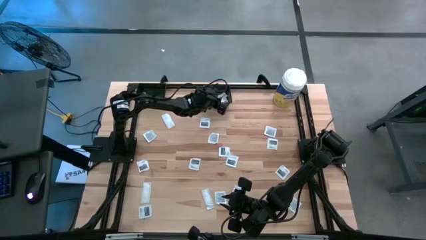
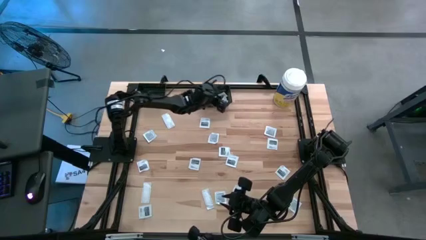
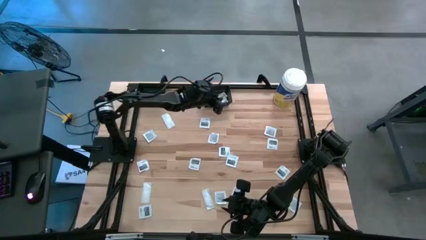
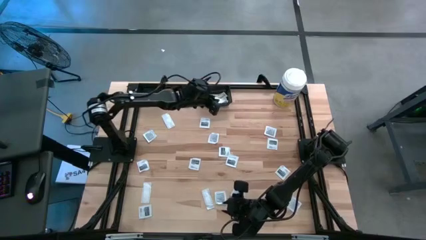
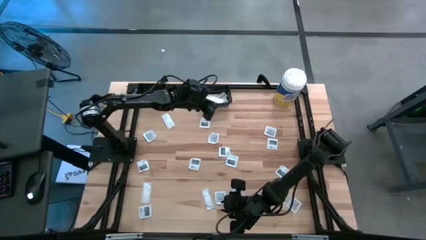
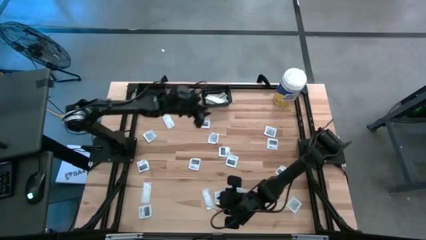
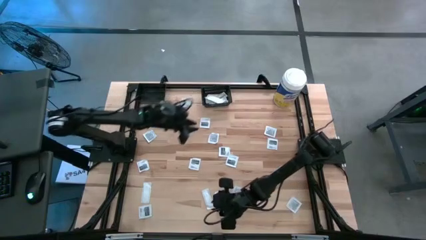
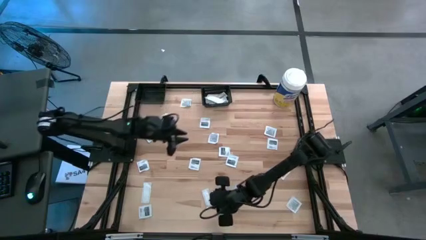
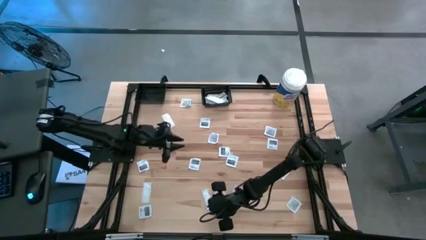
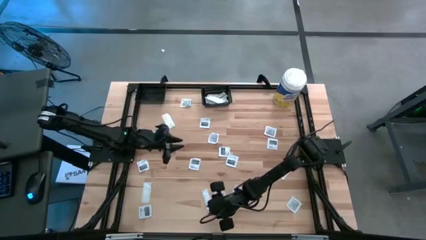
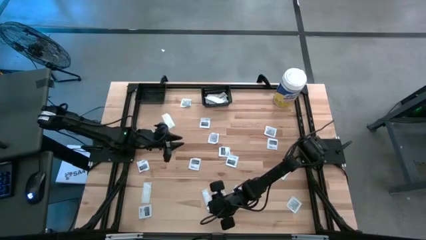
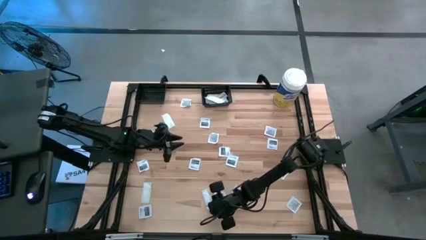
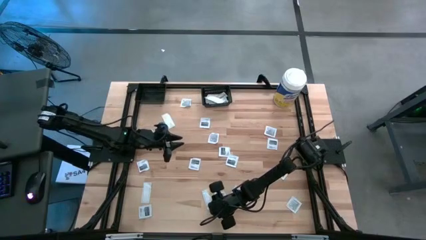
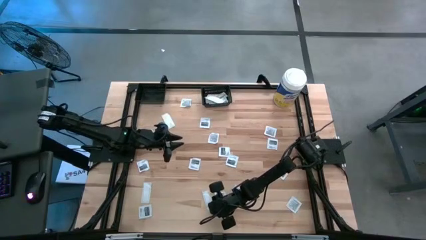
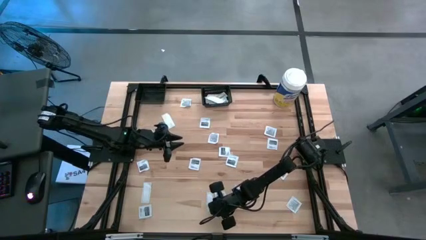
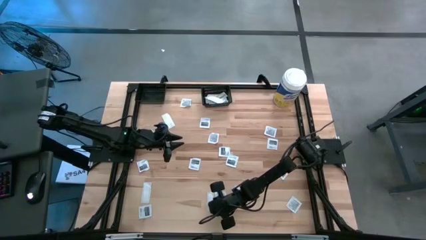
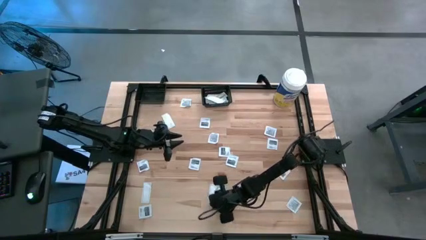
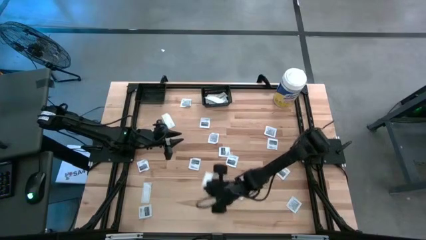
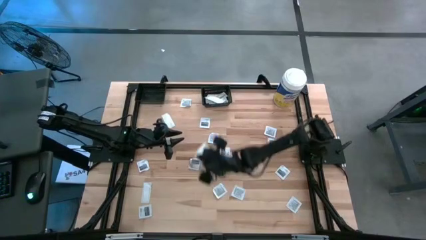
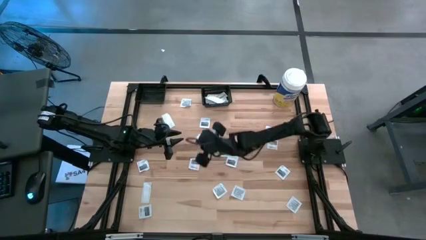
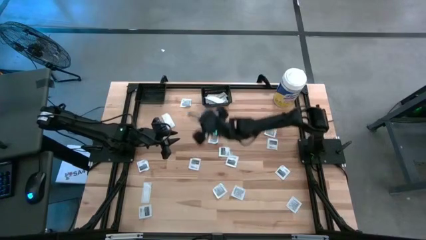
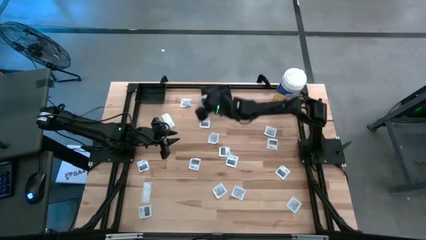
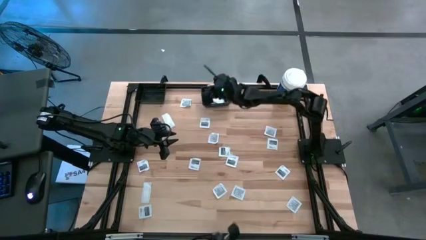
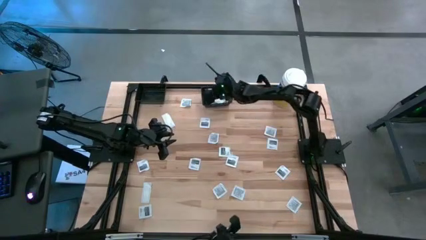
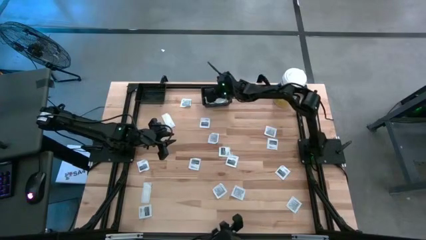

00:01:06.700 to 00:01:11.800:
Task: Pick & Place First Aid Supplies
Put the green bandage pack into the right black bin

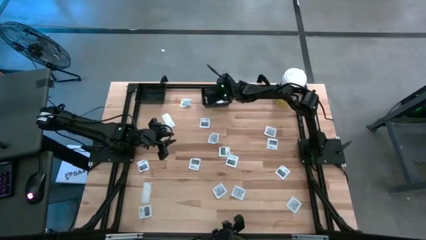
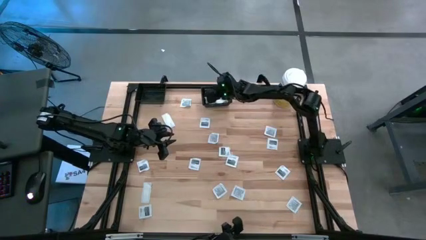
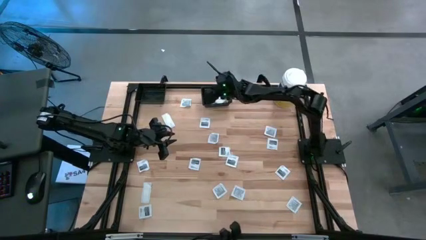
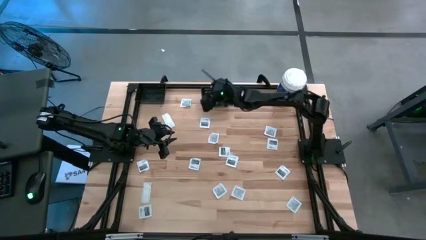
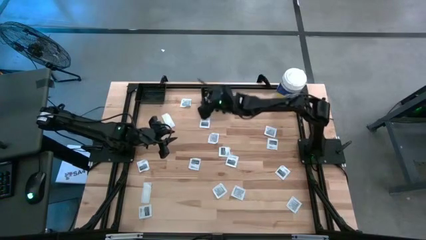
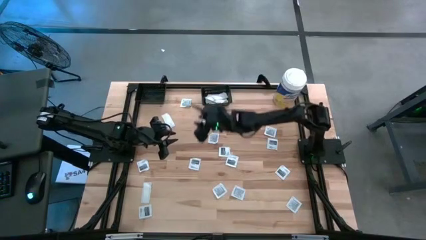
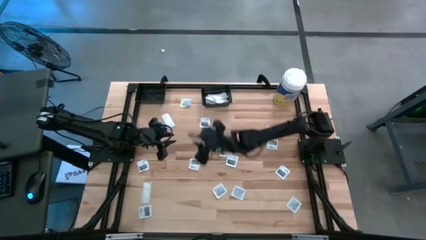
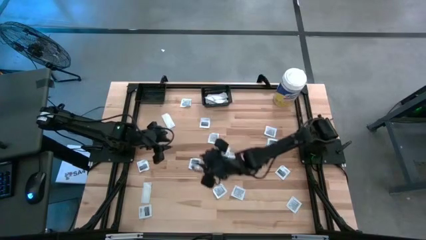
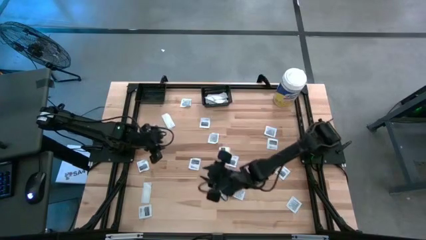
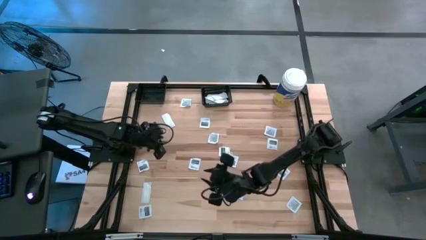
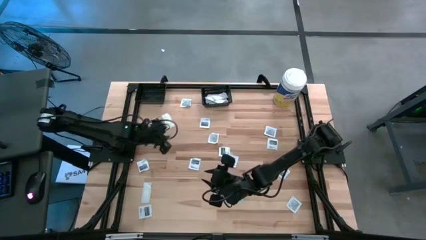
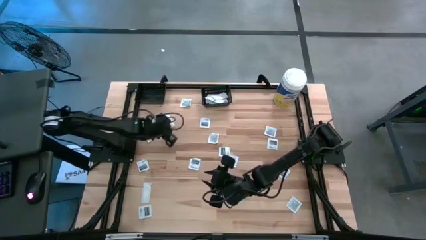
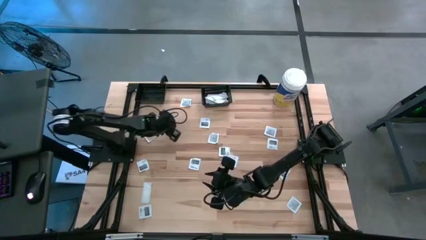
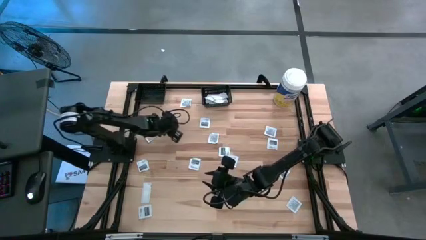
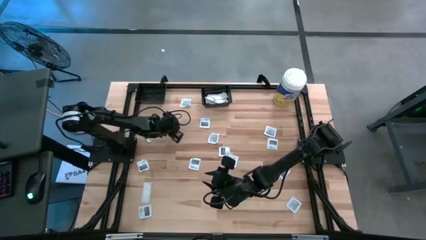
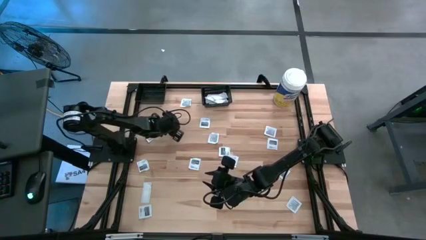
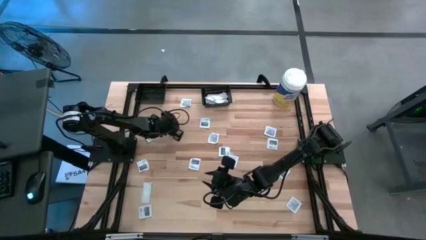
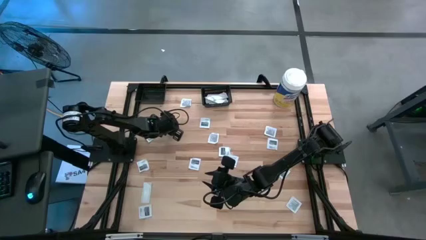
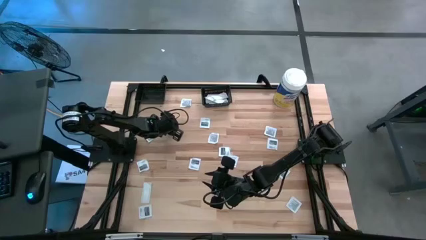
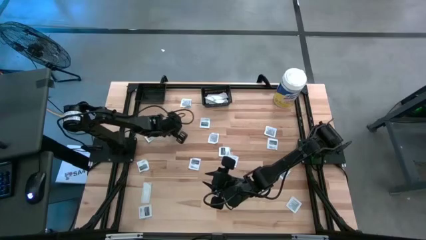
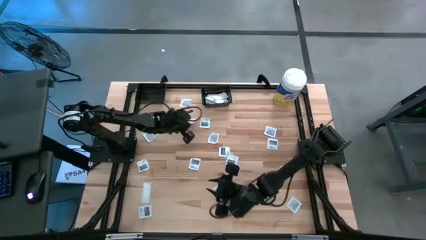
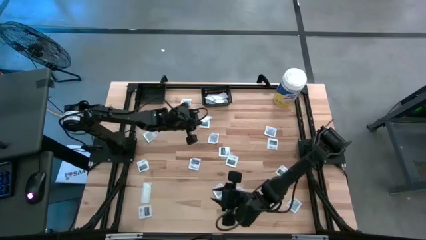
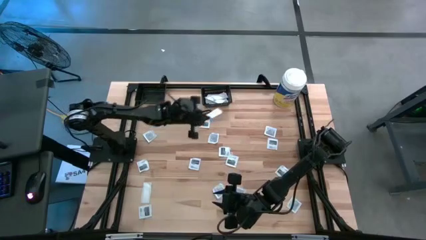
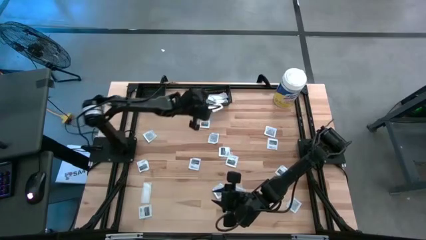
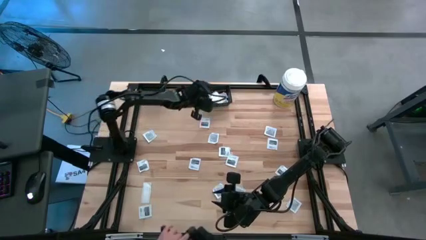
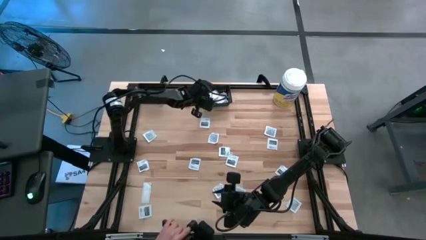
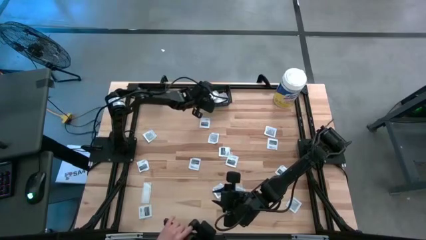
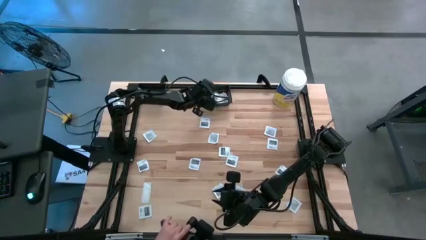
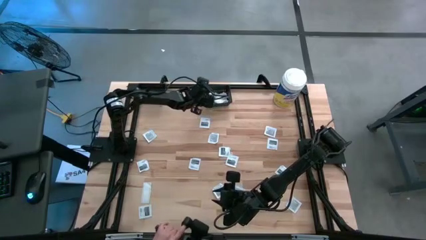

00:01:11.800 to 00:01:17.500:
Put the green bandage pack into the right black bin

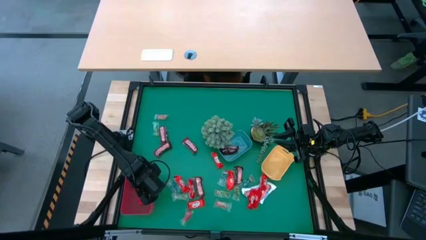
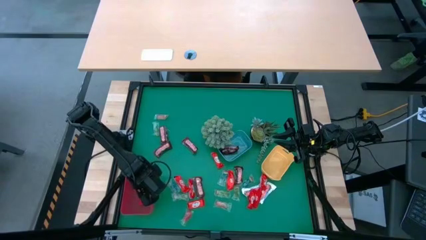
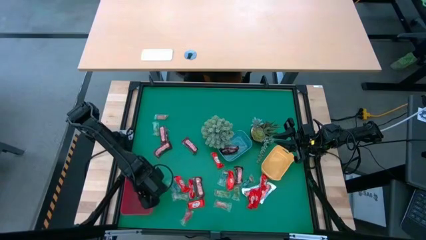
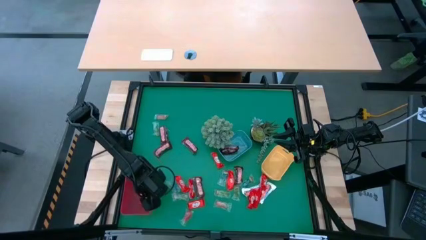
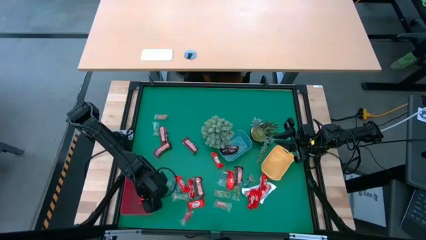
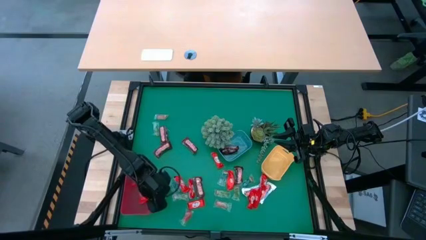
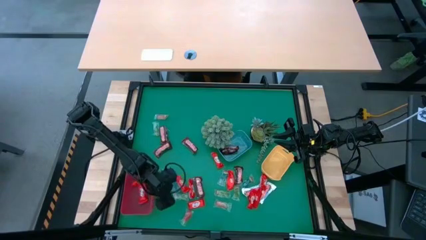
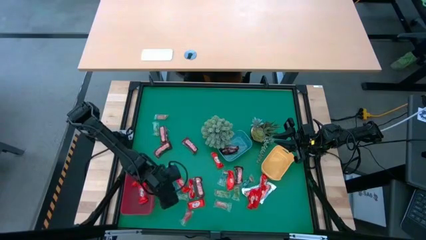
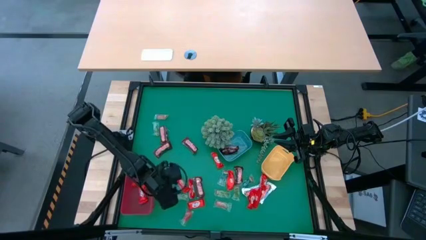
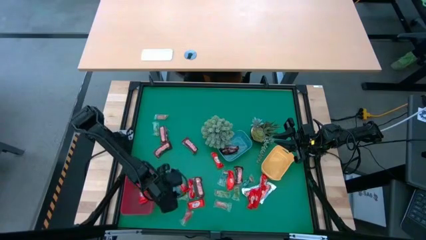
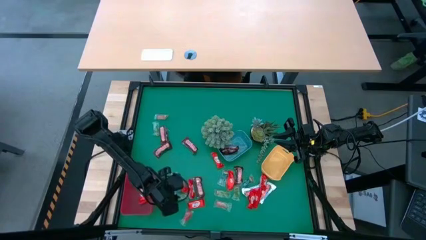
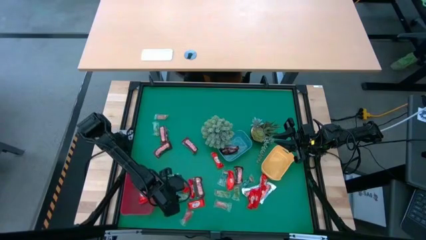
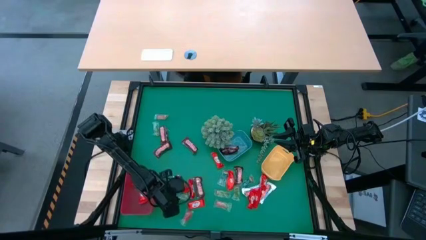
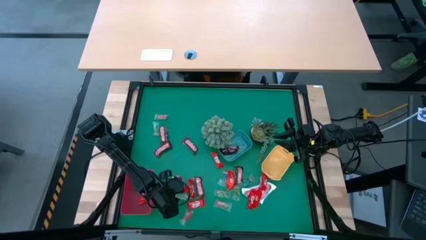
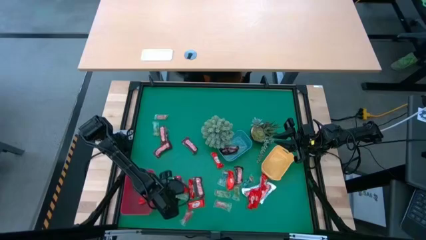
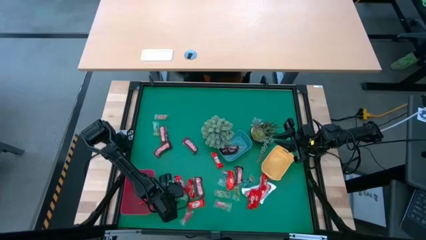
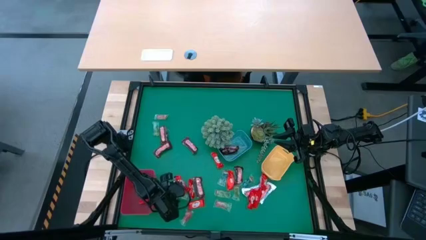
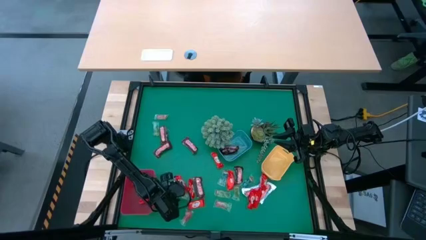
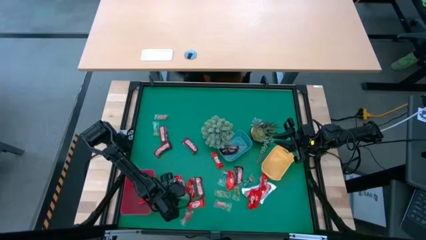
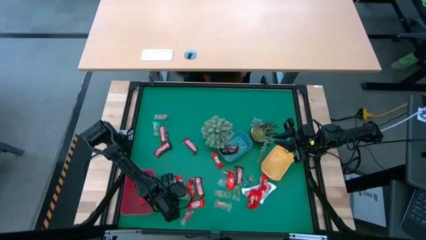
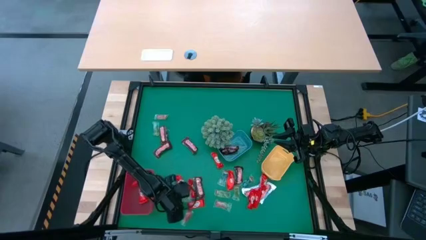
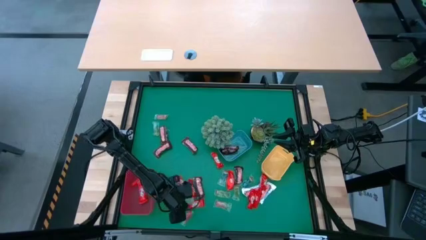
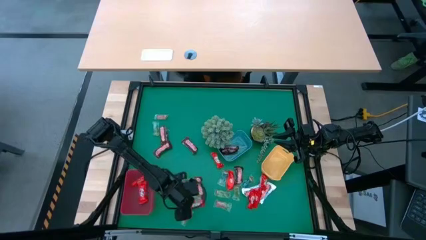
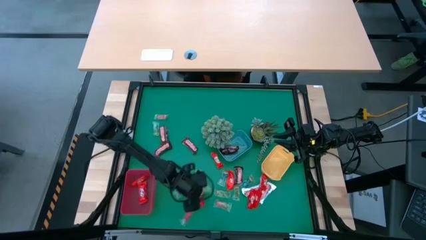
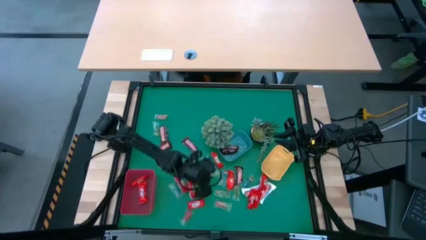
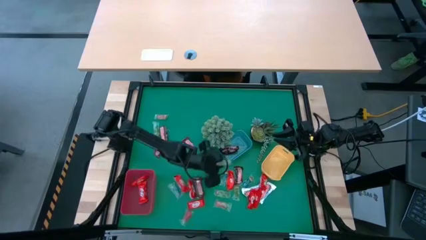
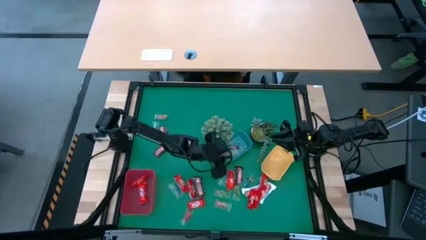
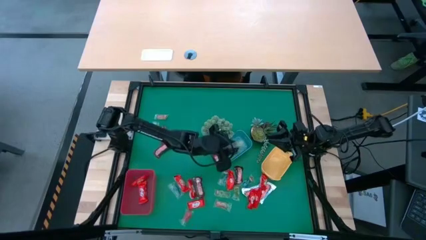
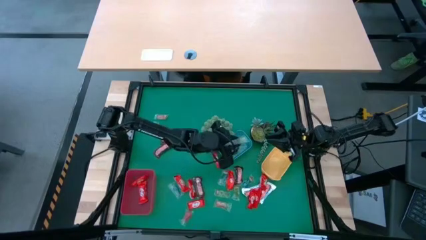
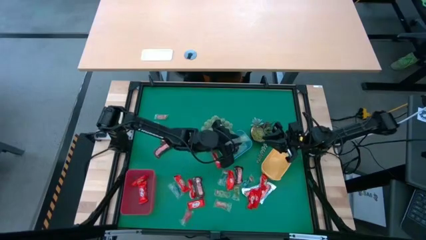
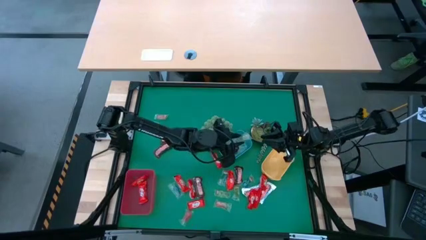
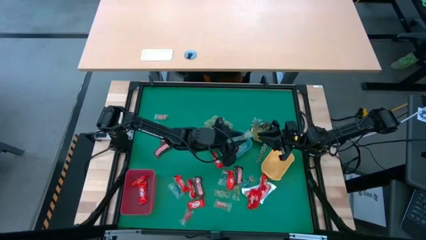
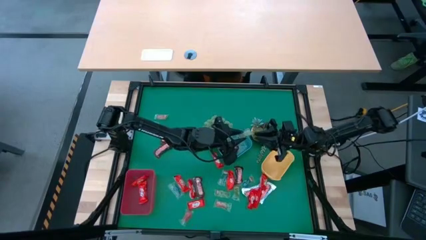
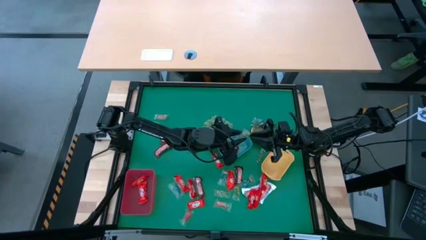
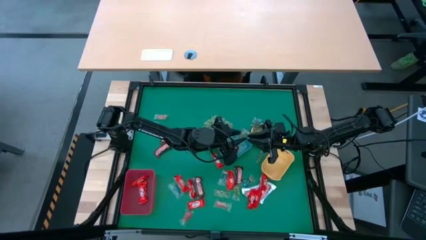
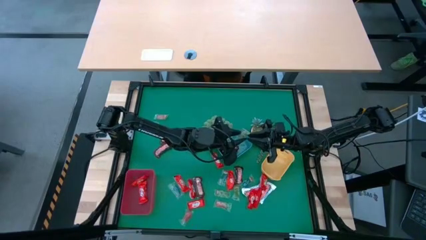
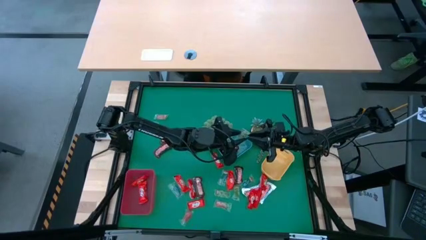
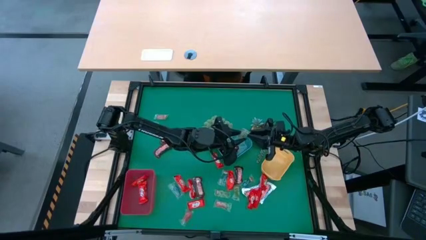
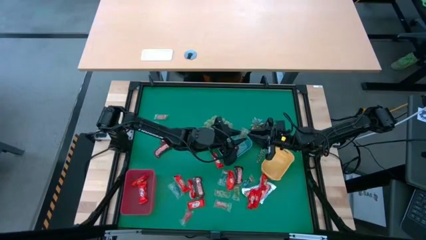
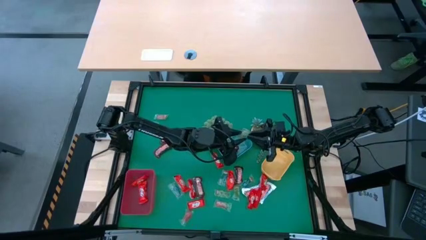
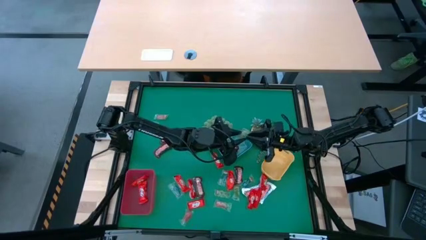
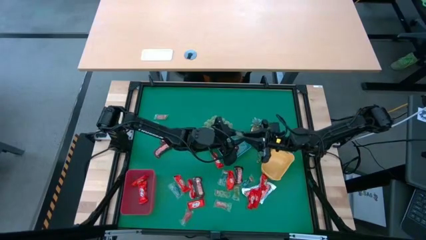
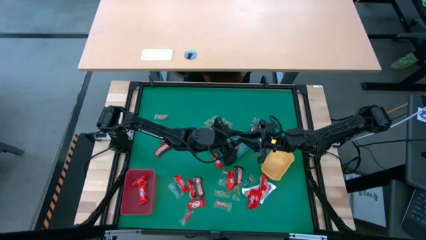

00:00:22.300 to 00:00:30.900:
Task: Organize candy in baskets
Put the green gummy into the yellow bin
